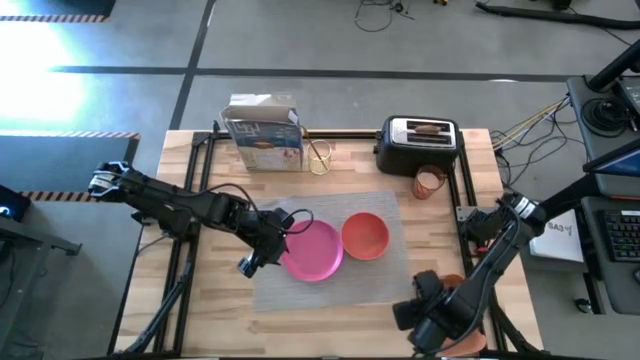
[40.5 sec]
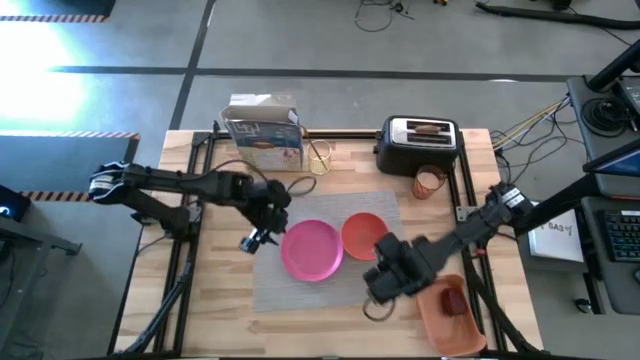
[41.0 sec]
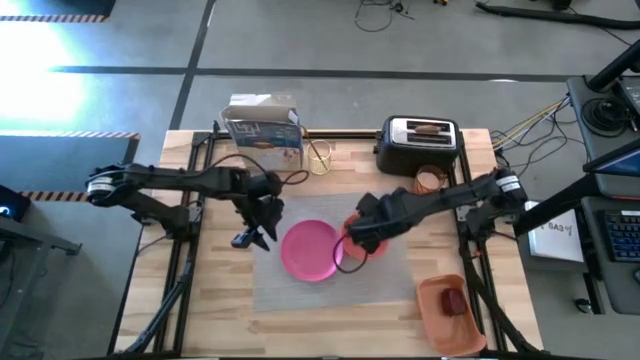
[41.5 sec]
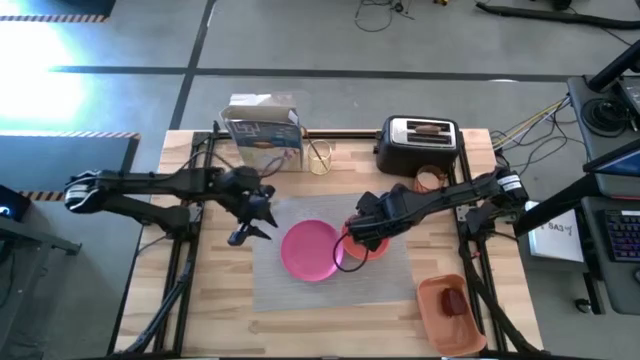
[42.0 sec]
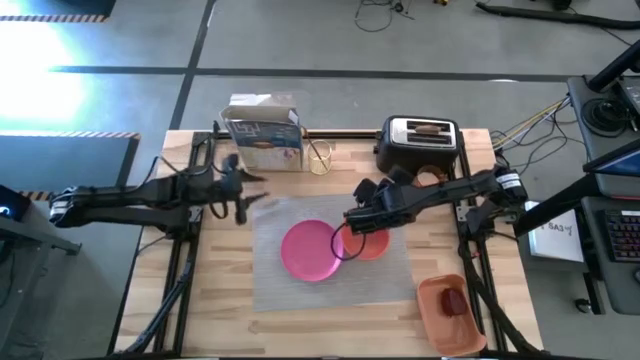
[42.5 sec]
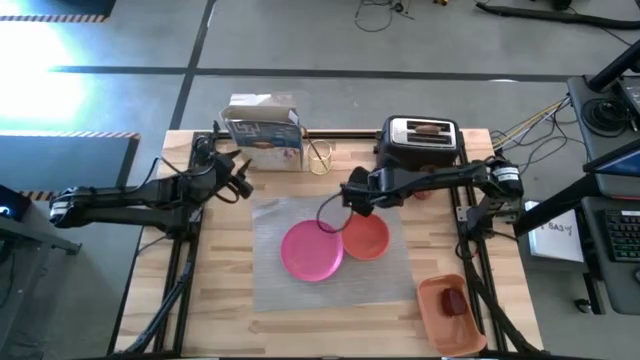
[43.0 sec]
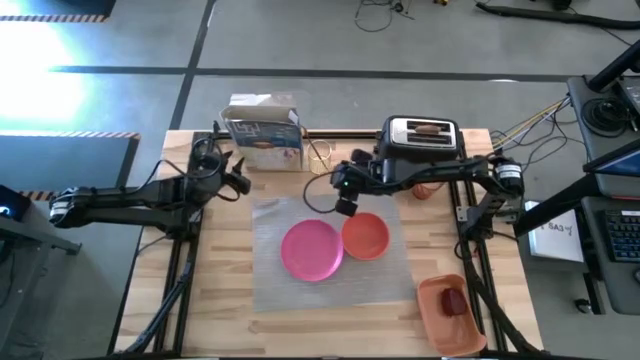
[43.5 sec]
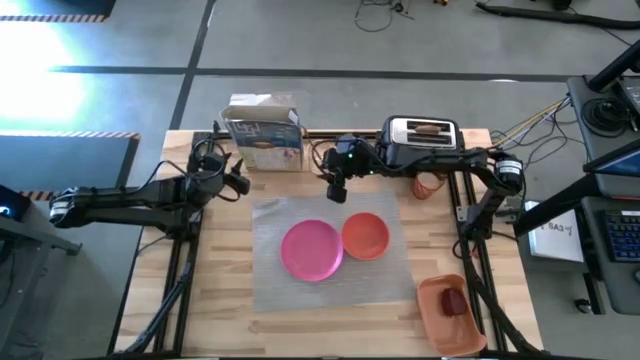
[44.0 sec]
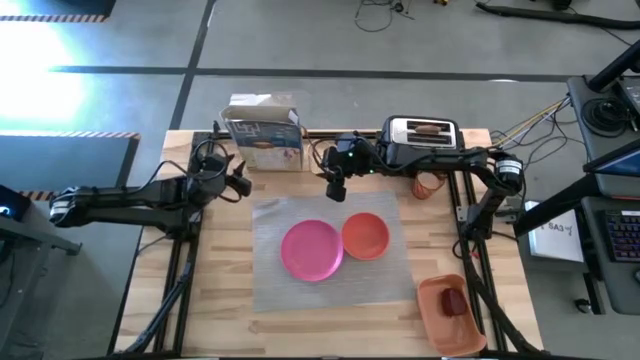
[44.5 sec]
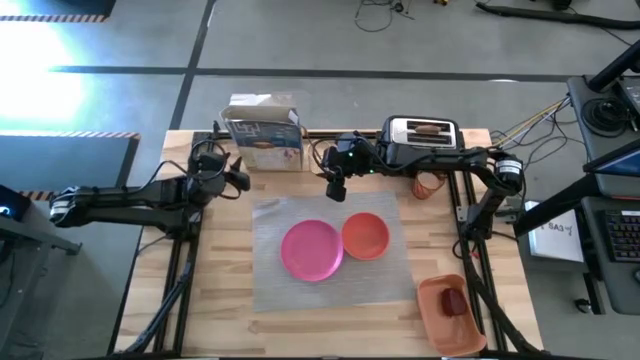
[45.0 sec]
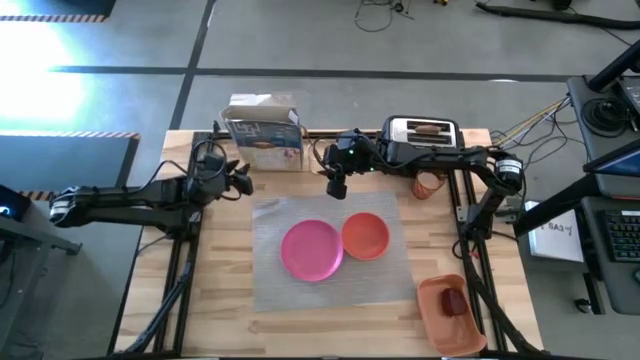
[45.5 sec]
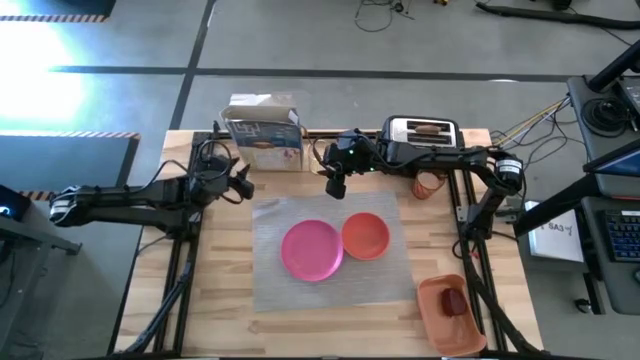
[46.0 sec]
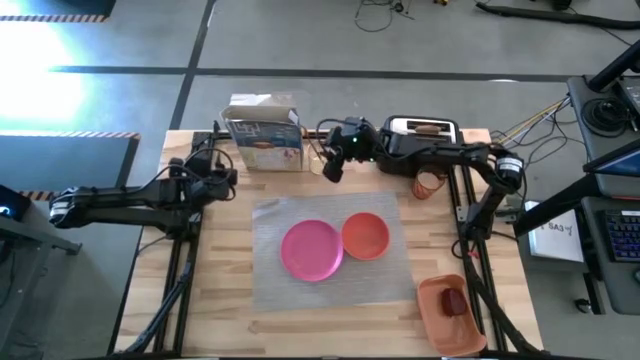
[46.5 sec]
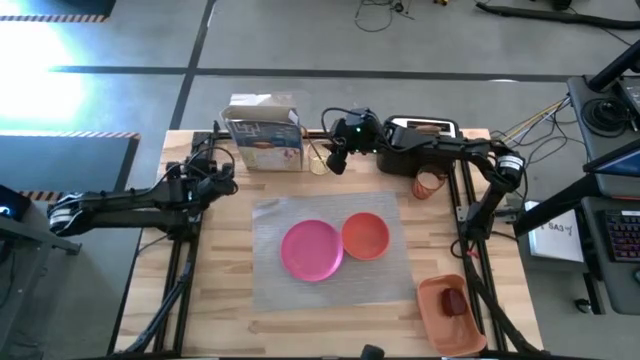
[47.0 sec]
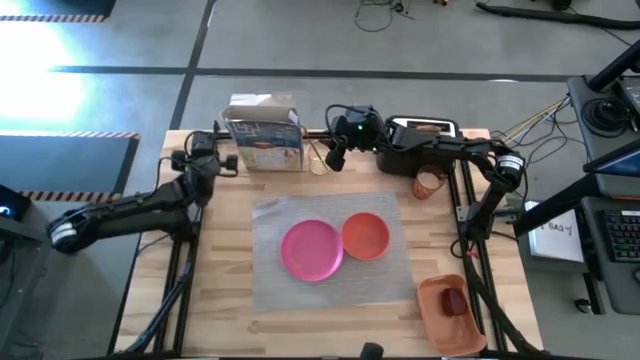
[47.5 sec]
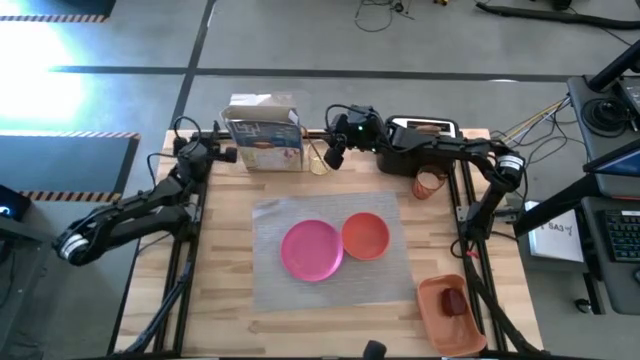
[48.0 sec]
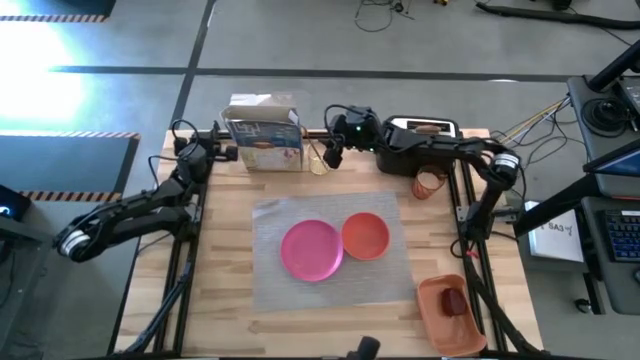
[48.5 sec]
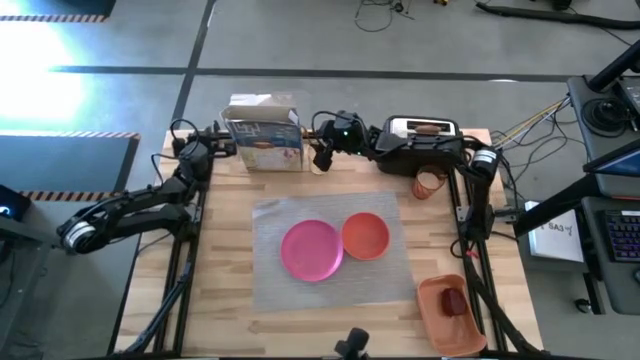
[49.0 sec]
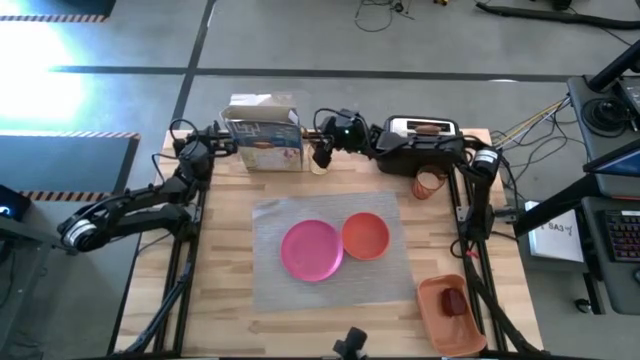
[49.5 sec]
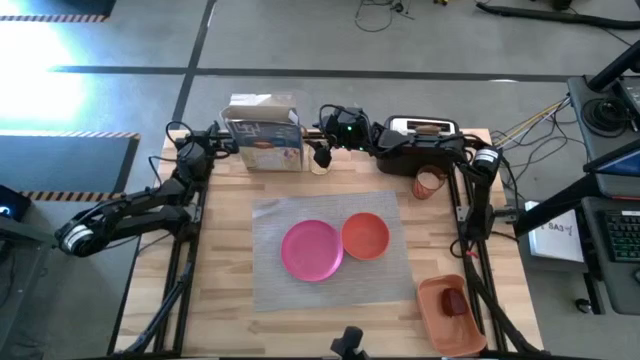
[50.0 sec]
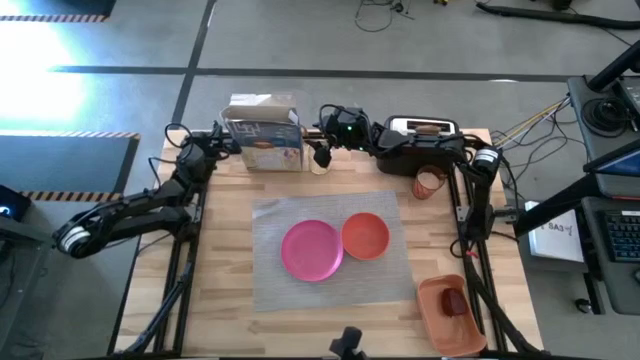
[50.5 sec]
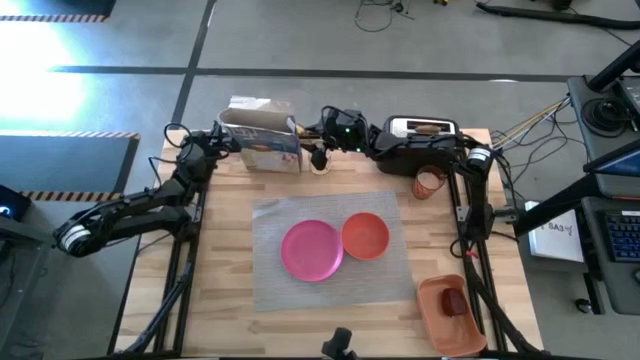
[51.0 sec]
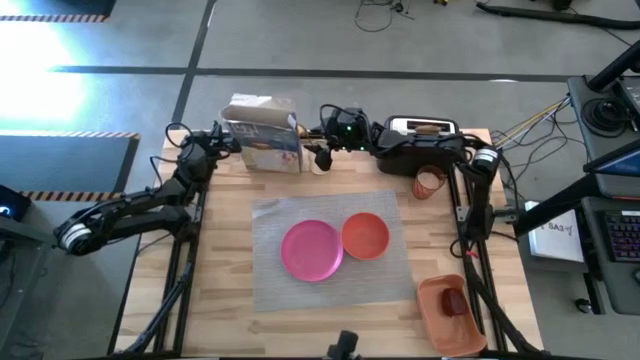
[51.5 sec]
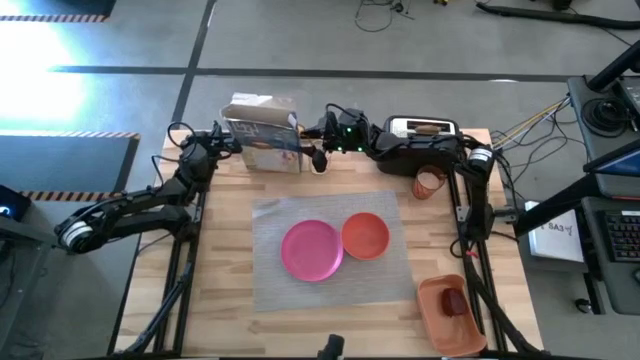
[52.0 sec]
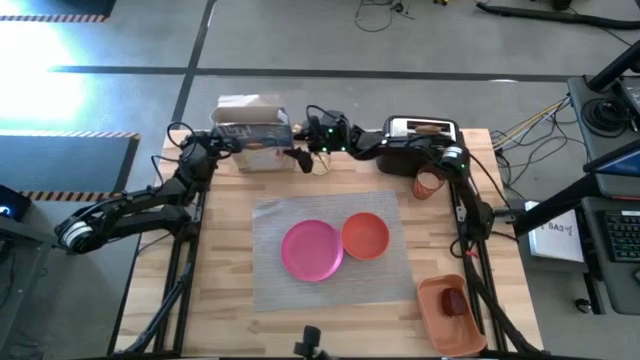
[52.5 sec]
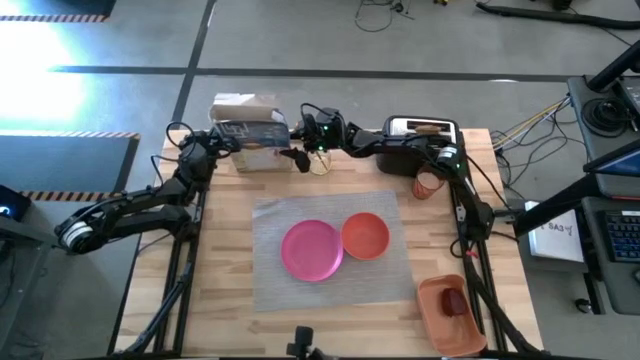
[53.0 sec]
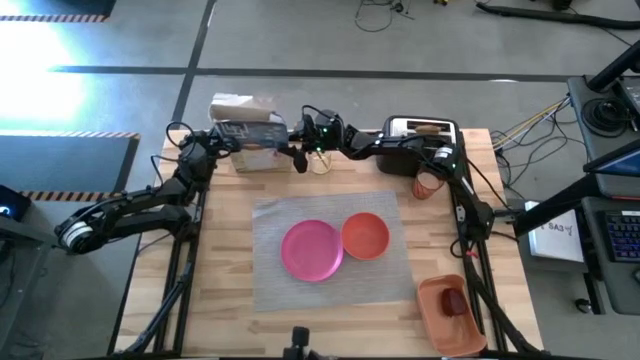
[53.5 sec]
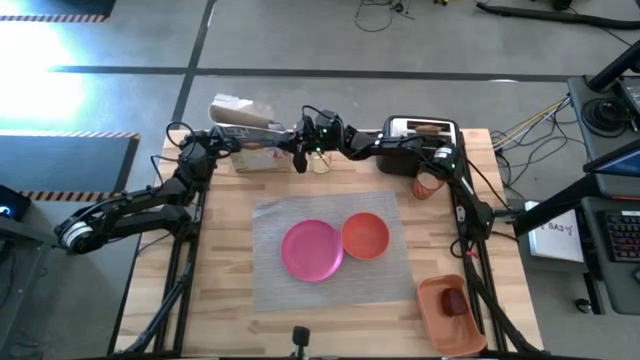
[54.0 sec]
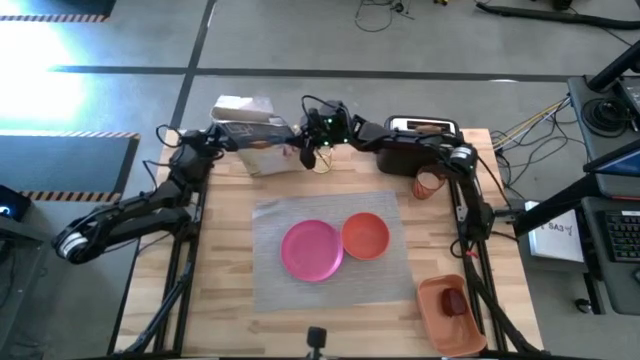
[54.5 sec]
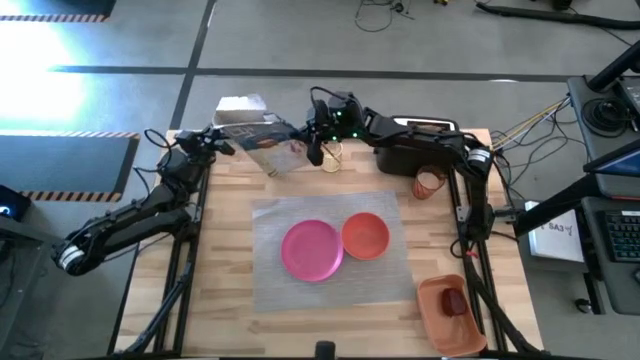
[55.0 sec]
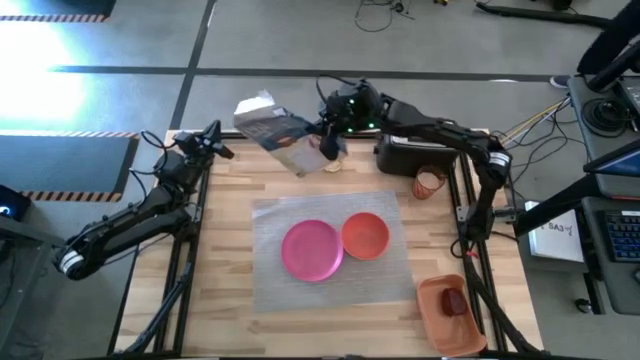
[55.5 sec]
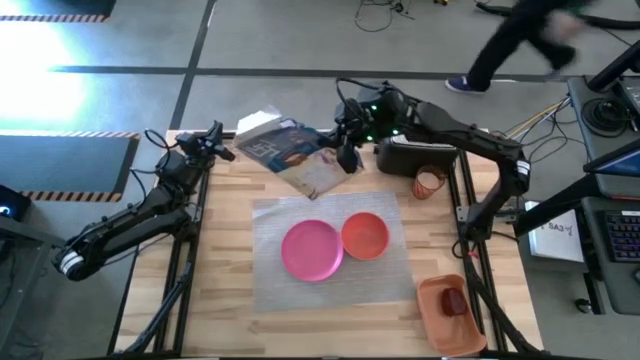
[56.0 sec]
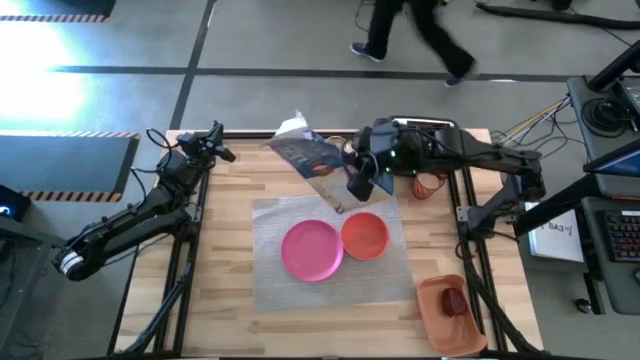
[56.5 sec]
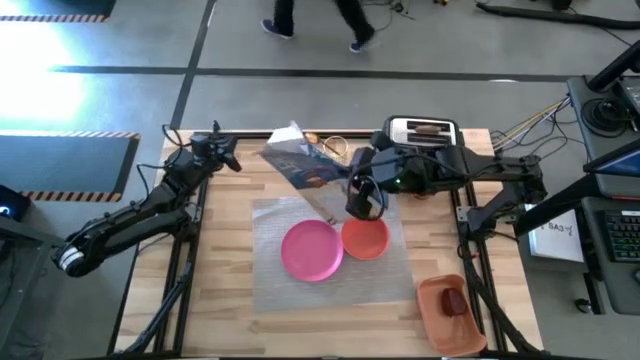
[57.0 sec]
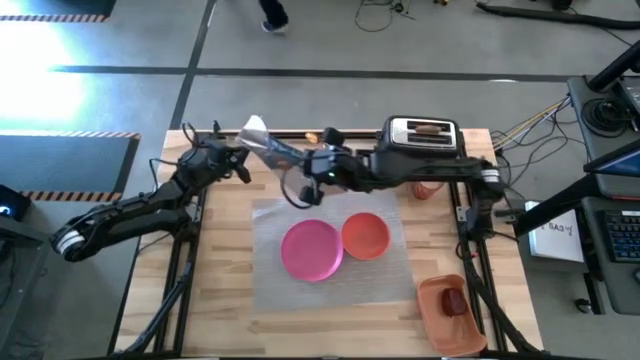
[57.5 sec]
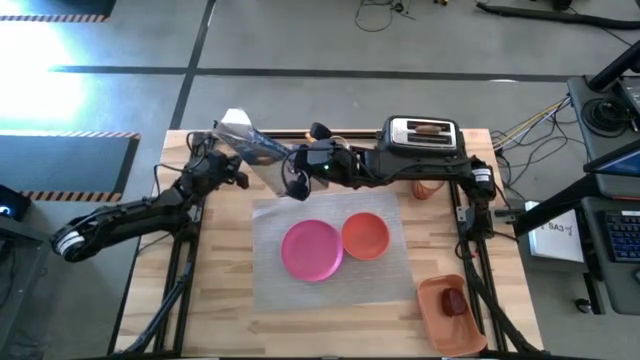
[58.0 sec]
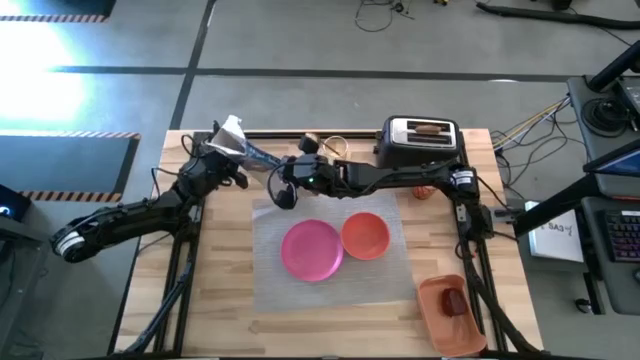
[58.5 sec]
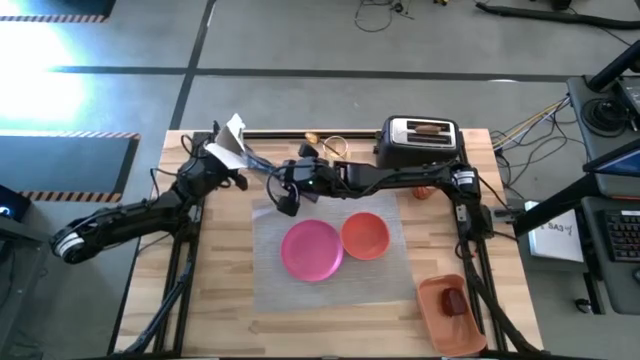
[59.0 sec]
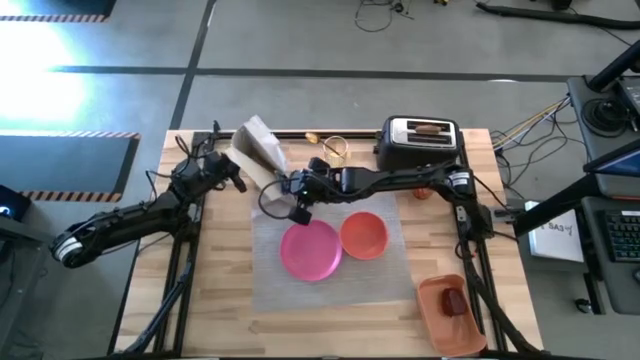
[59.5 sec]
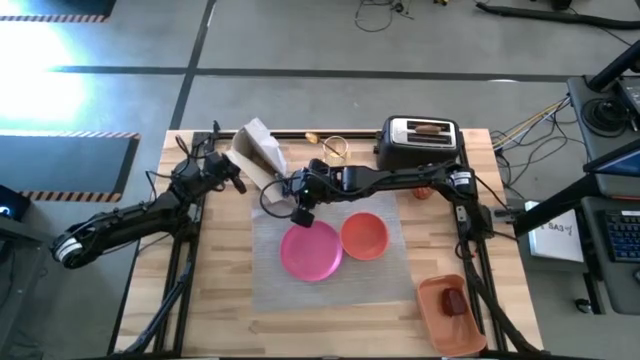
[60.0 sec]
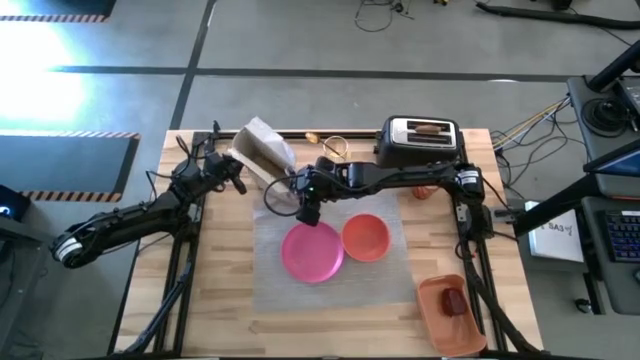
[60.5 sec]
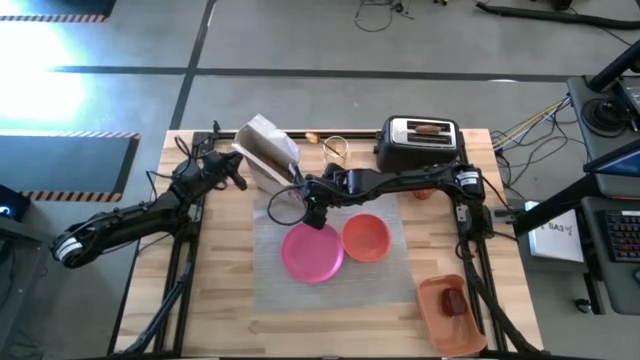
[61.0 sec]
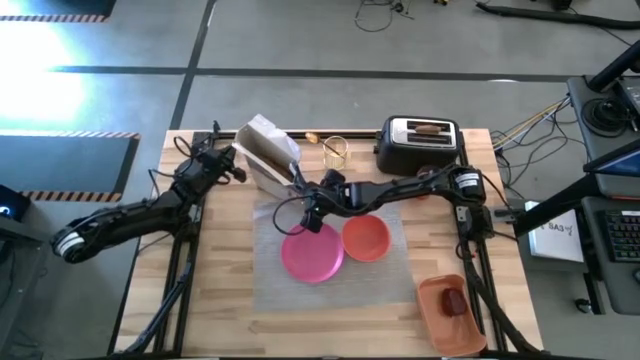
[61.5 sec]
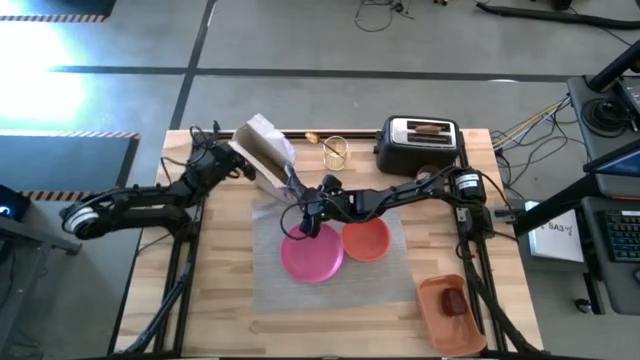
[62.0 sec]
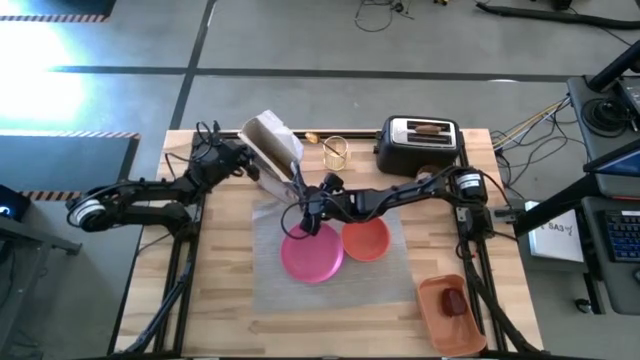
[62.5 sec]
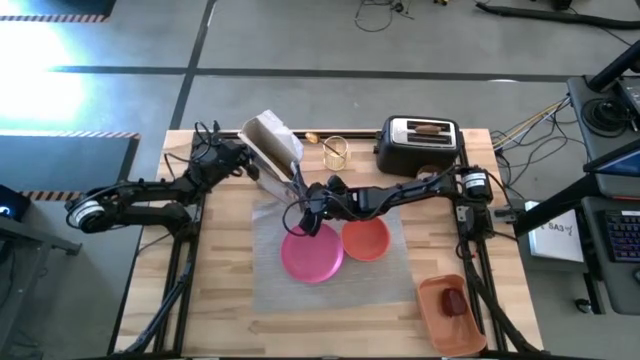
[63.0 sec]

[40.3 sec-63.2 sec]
Task: Arrange a breakfast setting
Pour the cereal from the blue cereal box into the orange bowl on the gray table mat
